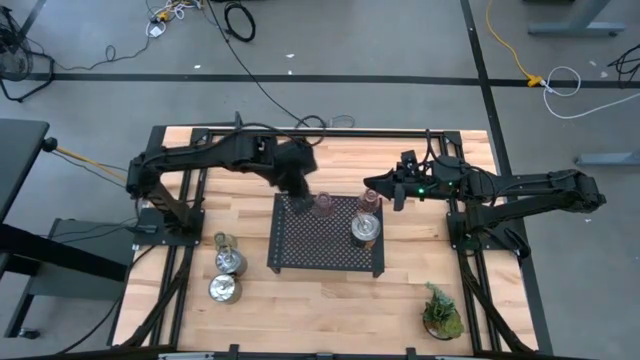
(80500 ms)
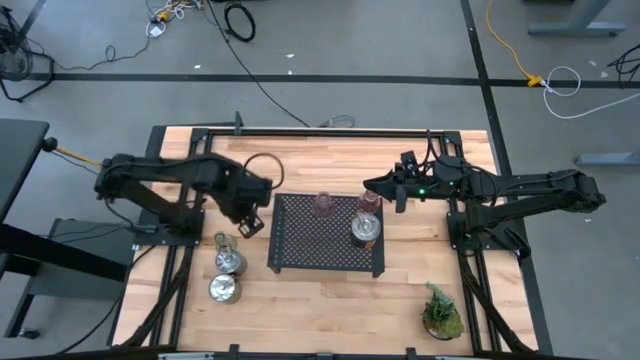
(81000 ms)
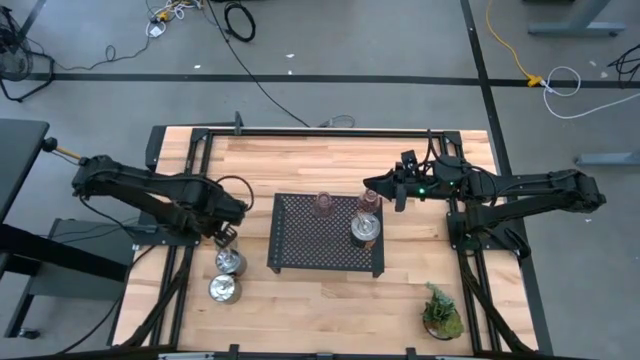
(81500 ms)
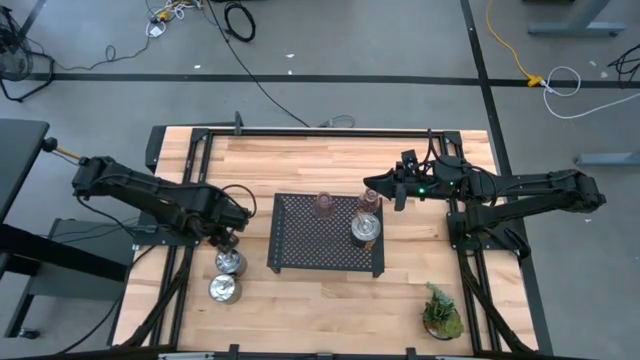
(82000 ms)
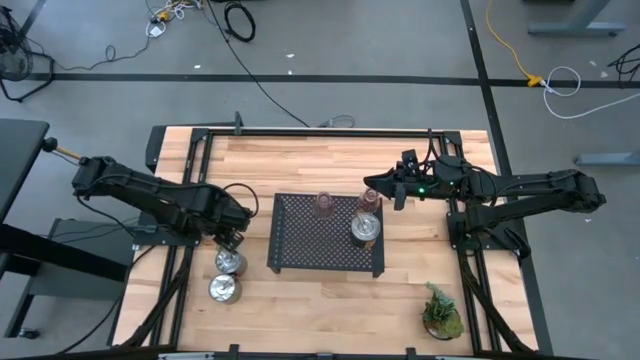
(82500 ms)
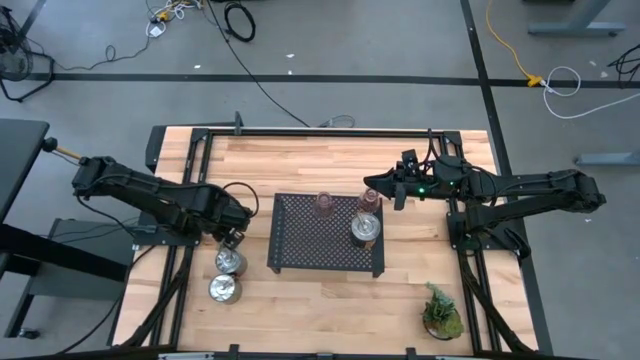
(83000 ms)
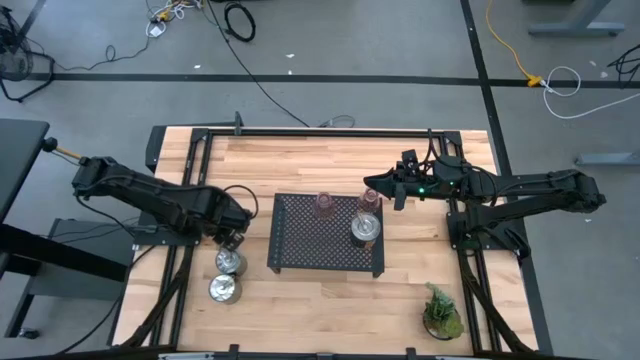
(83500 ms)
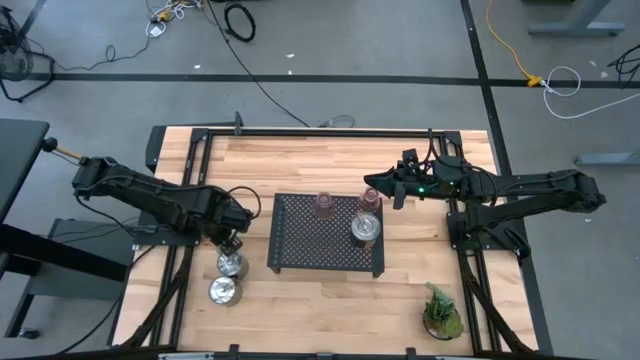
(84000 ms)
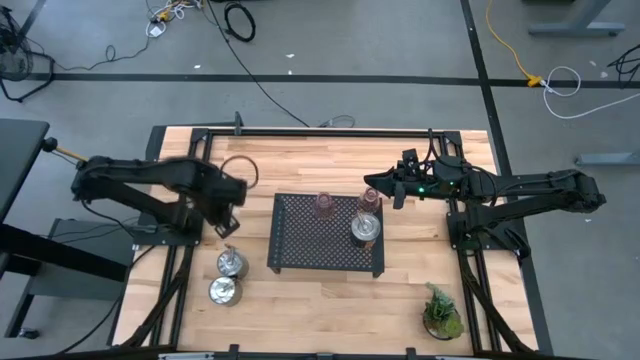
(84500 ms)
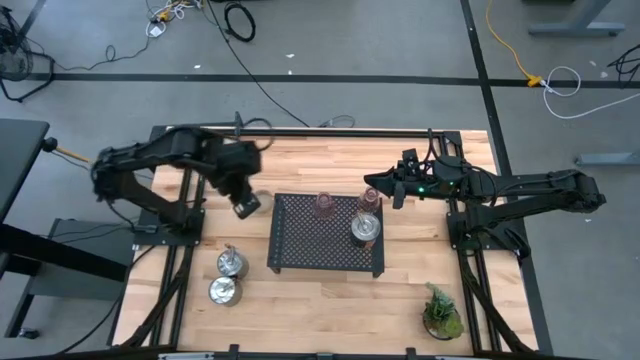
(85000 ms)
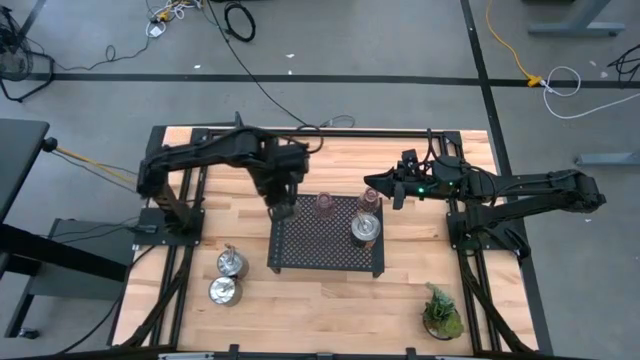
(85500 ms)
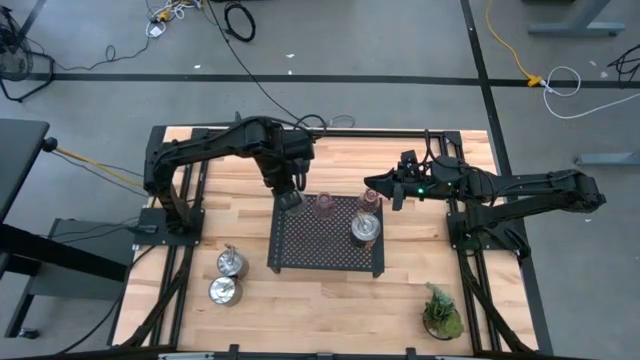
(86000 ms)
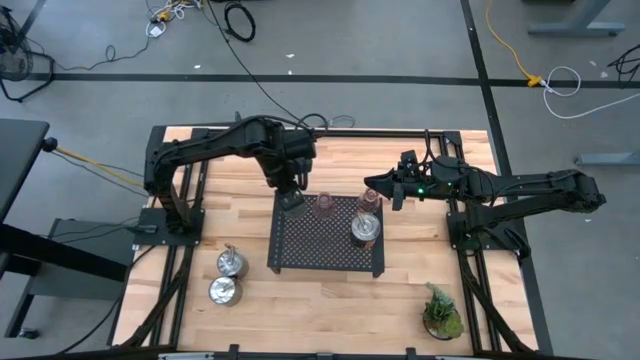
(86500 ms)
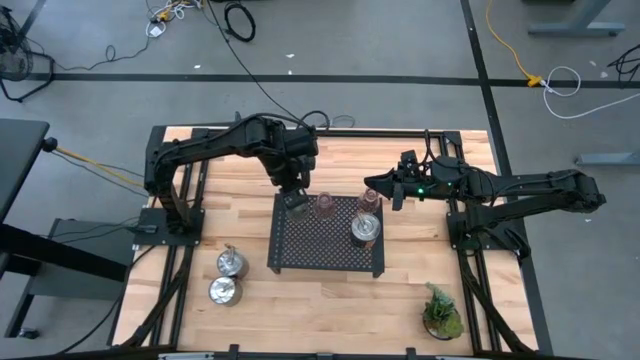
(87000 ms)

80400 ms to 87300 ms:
Task: Pick & Place candle stick holders
Put the green candle holder on the shelf

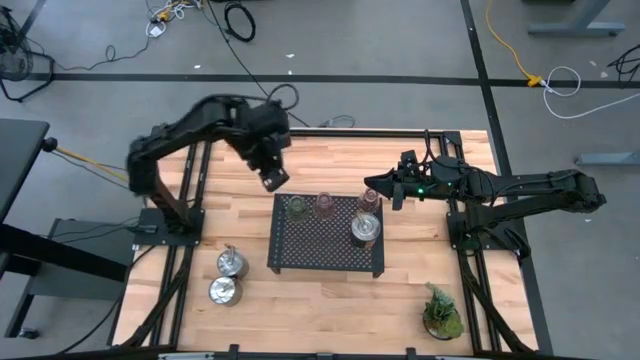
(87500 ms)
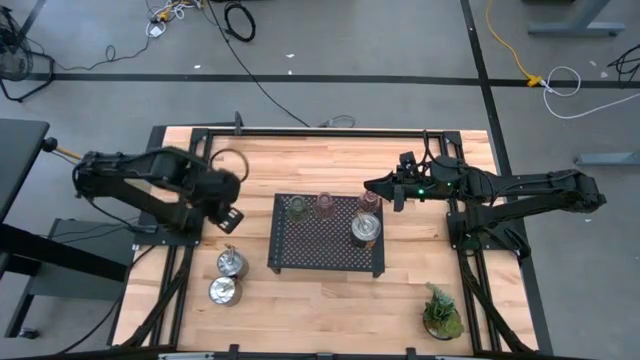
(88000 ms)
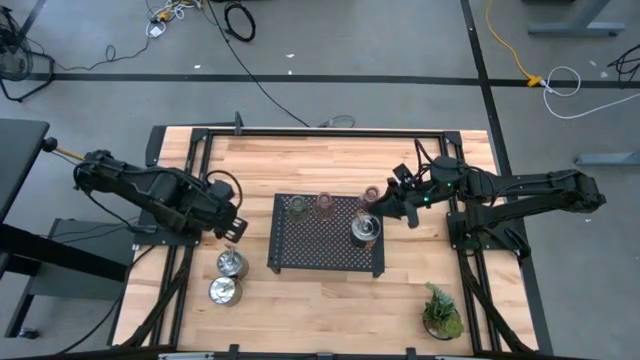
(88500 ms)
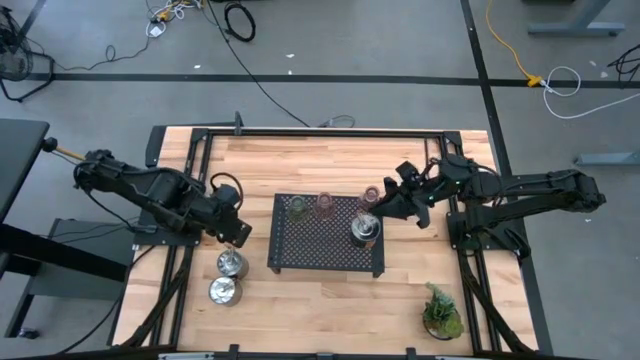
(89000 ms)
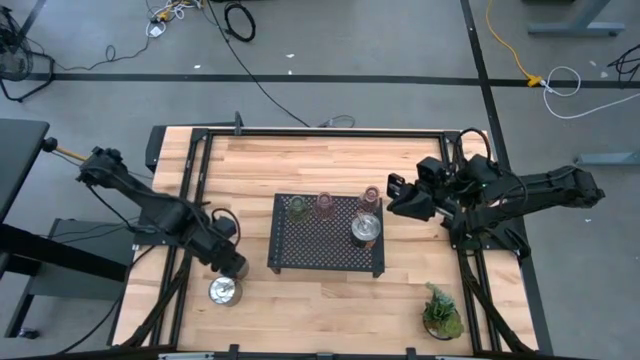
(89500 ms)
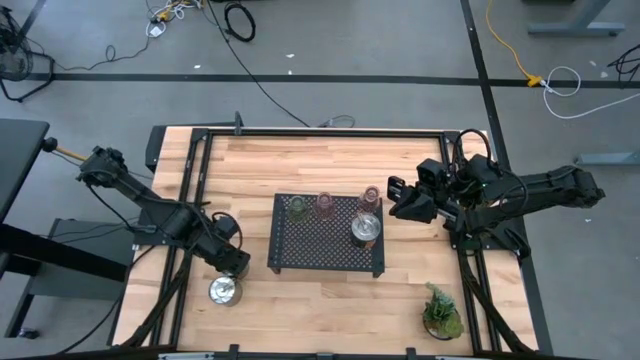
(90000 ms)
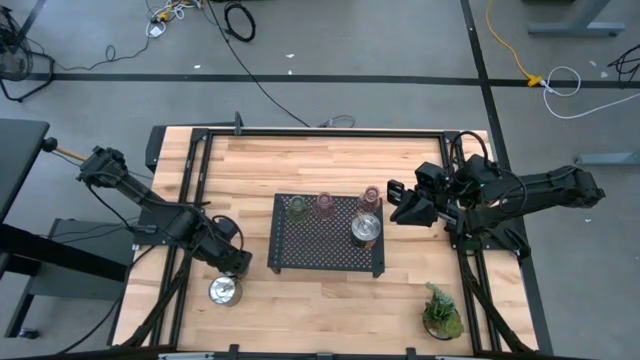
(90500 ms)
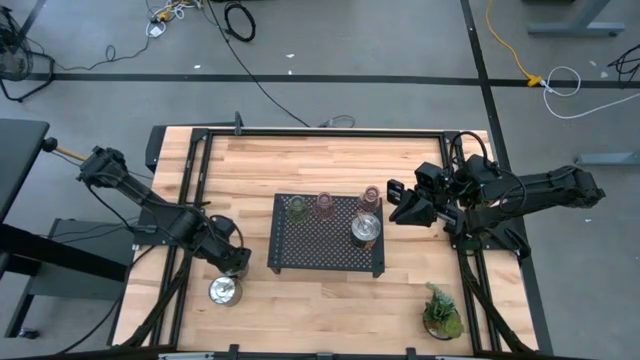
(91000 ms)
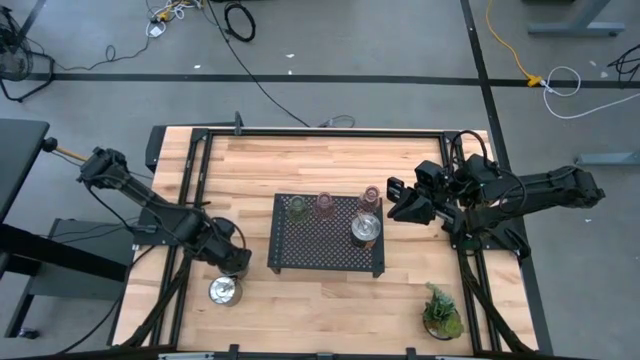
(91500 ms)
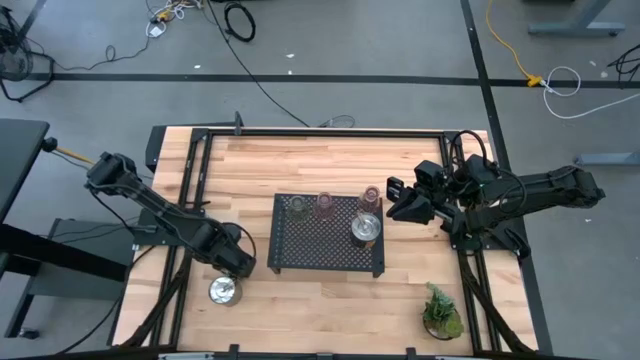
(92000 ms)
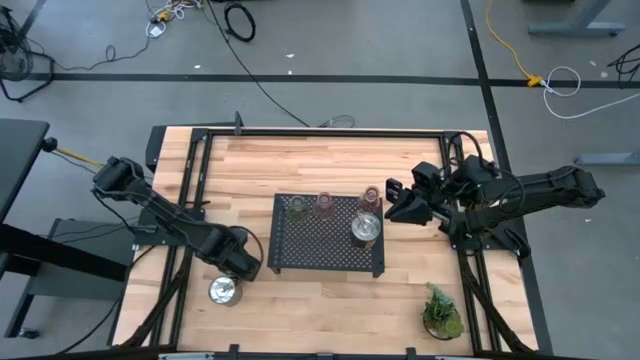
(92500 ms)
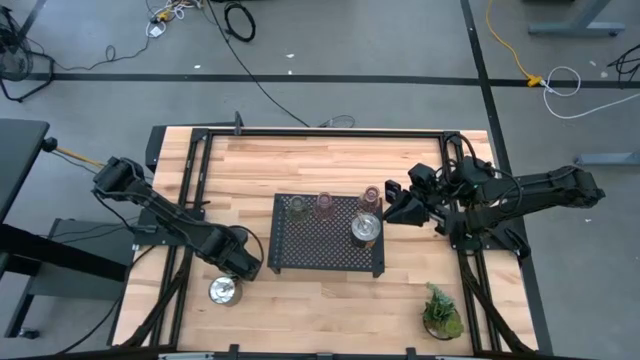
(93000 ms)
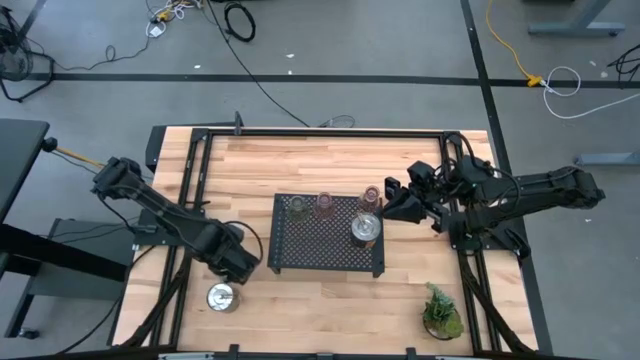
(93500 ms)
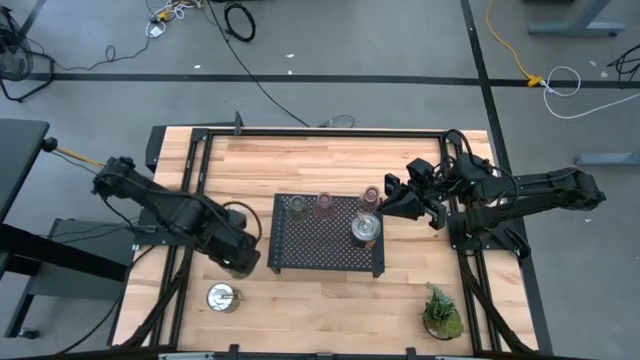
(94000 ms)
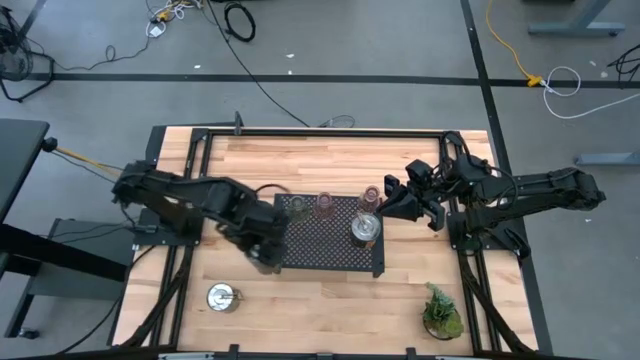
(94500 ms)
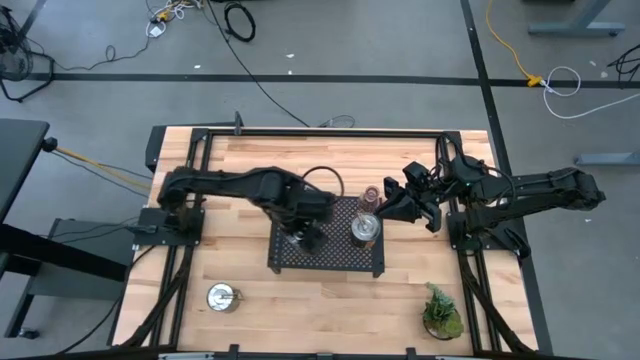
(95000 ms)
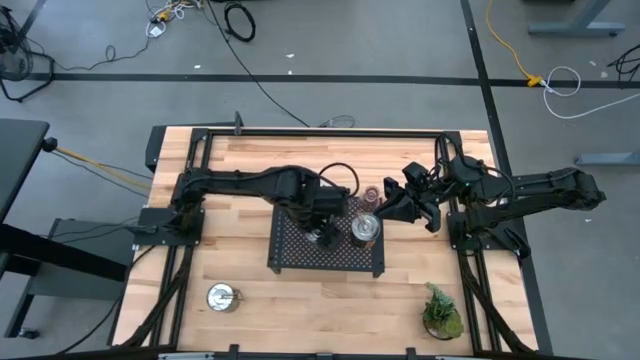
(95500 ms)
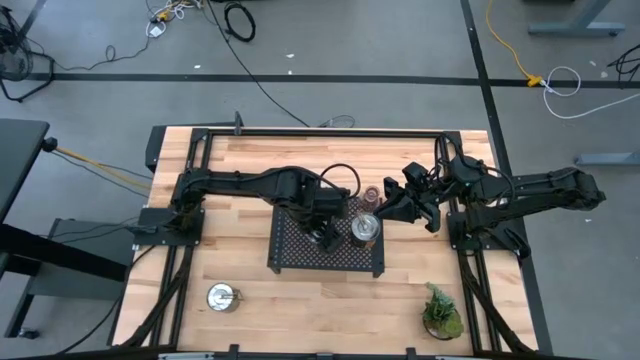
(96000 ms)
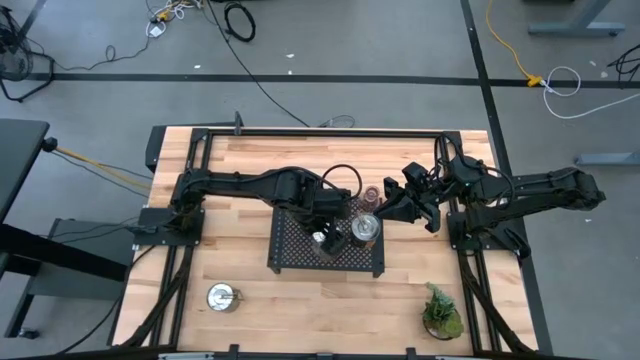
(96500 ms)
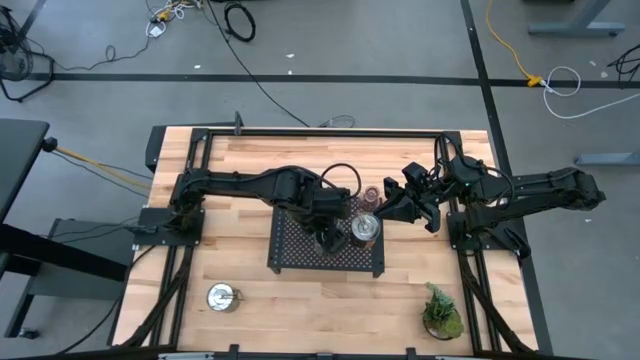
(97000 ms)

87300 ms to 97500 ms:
Put the silver scented candle on the shelf
